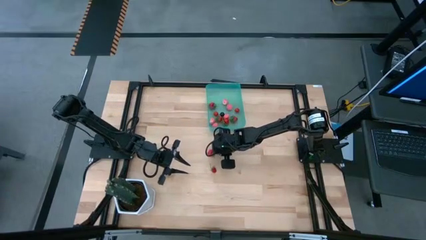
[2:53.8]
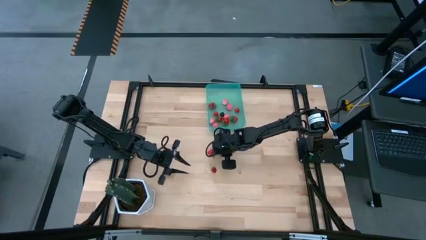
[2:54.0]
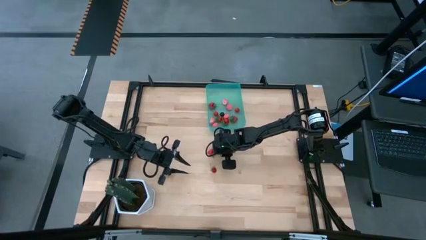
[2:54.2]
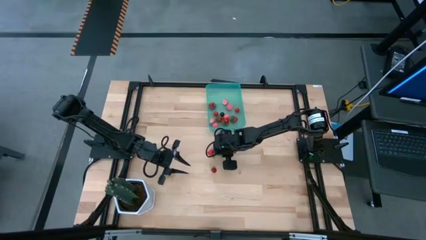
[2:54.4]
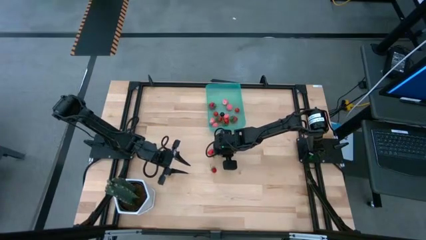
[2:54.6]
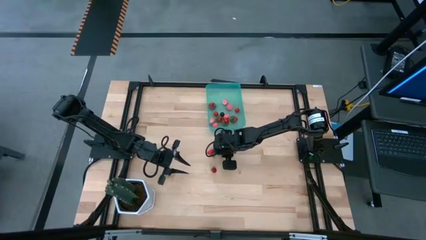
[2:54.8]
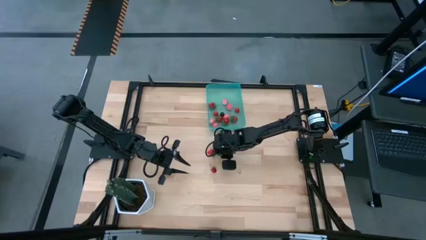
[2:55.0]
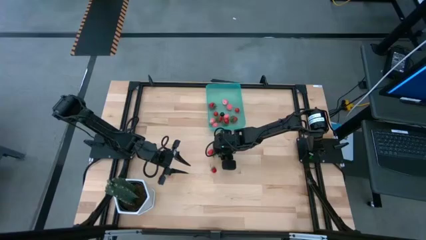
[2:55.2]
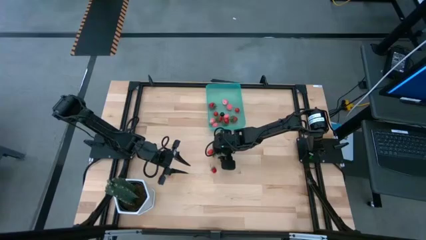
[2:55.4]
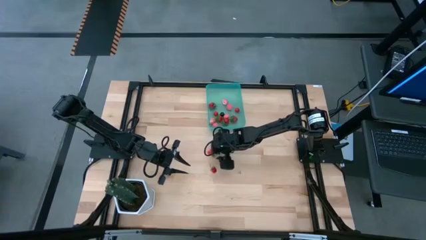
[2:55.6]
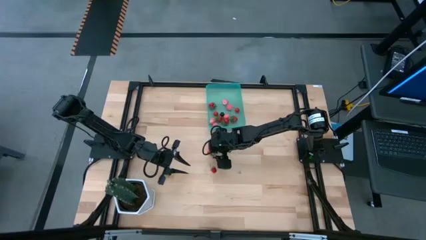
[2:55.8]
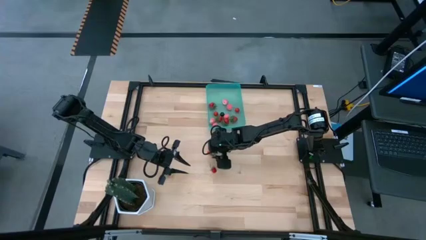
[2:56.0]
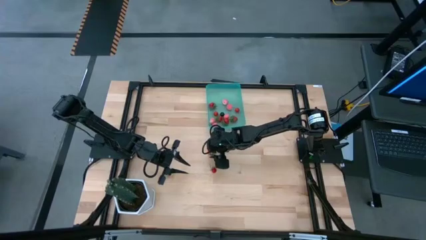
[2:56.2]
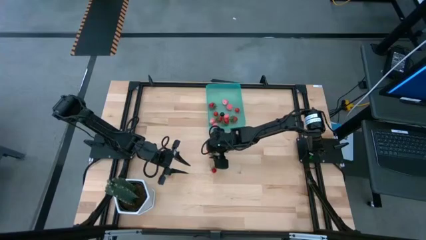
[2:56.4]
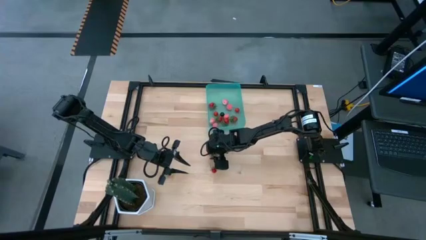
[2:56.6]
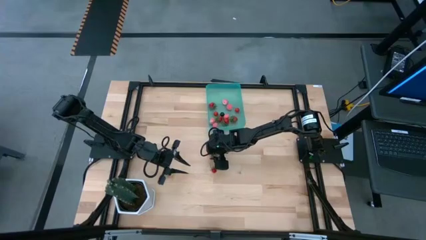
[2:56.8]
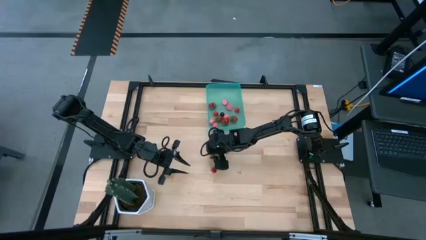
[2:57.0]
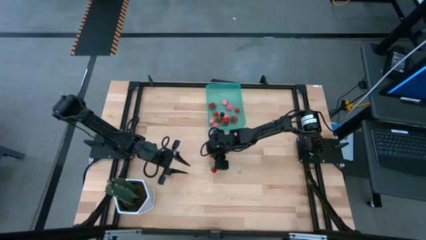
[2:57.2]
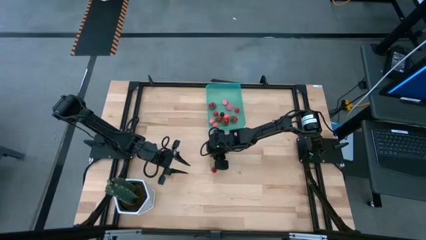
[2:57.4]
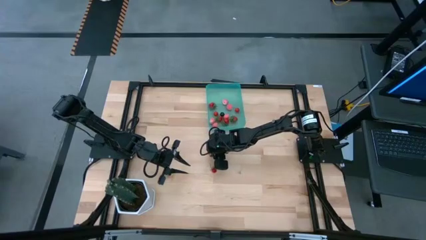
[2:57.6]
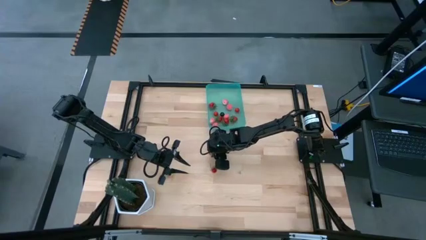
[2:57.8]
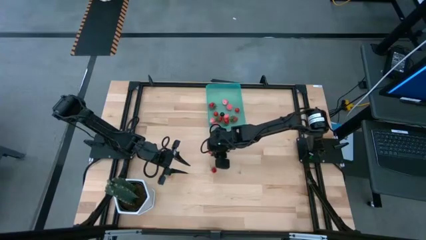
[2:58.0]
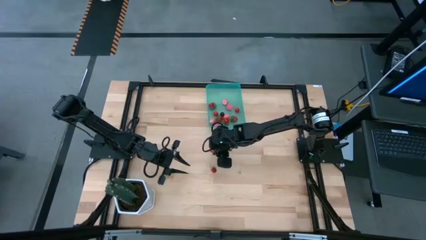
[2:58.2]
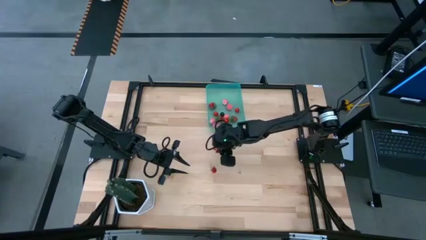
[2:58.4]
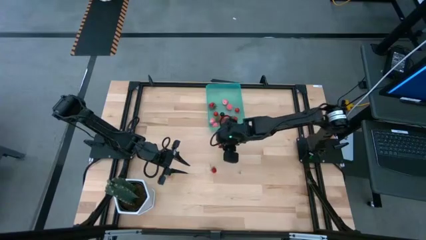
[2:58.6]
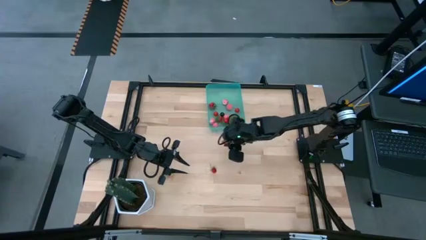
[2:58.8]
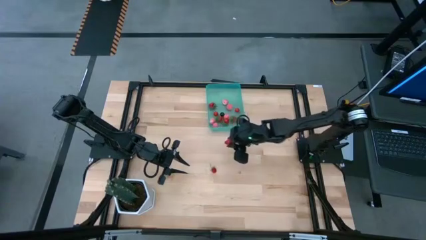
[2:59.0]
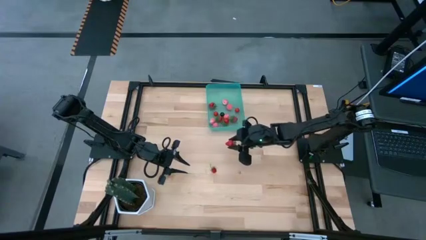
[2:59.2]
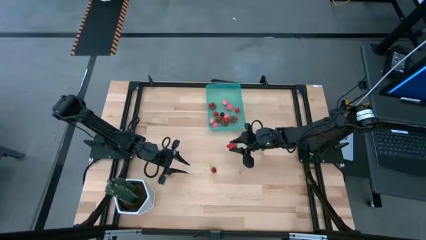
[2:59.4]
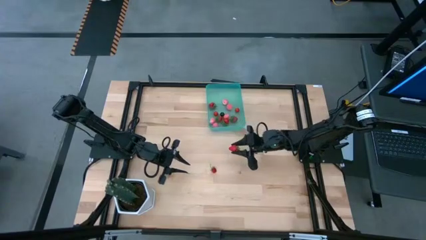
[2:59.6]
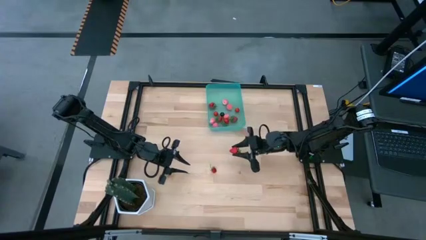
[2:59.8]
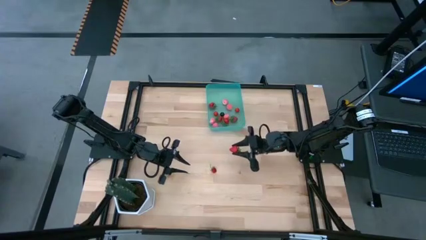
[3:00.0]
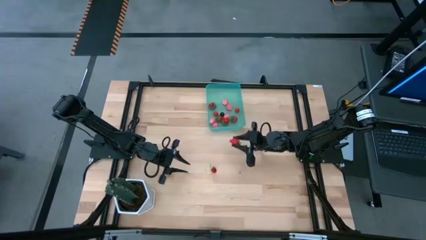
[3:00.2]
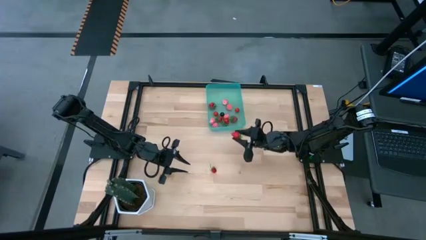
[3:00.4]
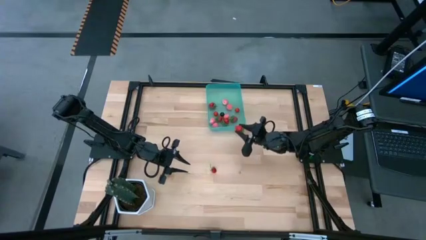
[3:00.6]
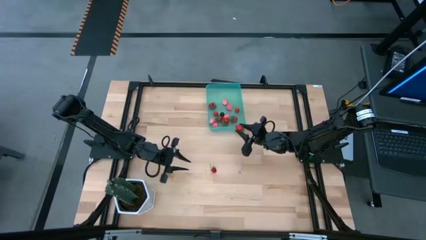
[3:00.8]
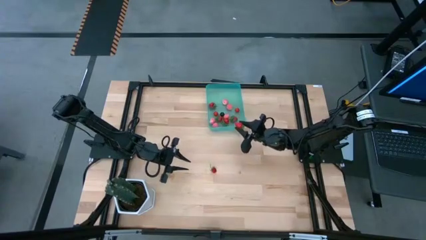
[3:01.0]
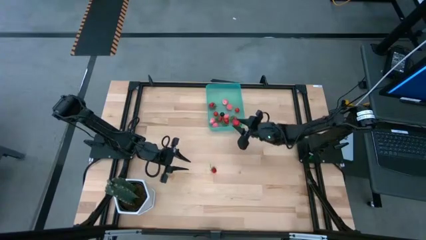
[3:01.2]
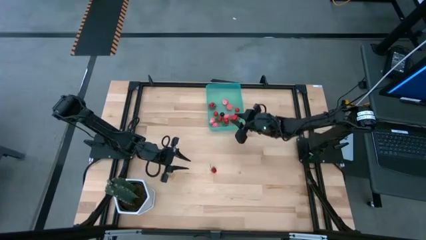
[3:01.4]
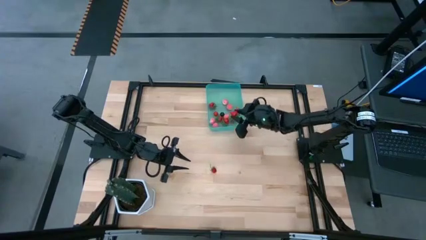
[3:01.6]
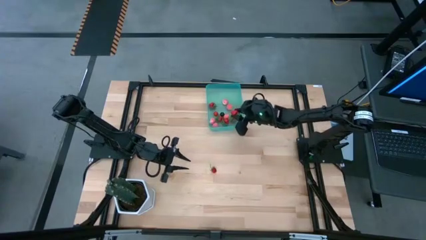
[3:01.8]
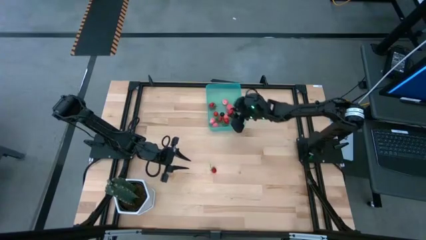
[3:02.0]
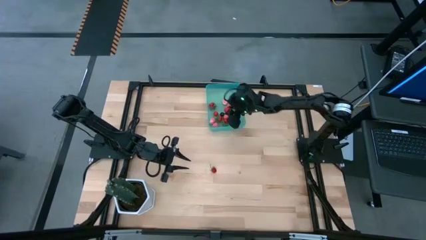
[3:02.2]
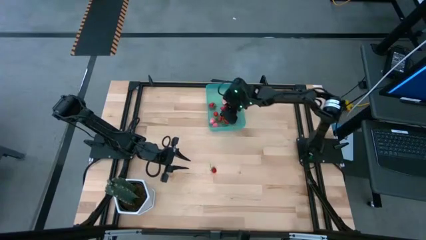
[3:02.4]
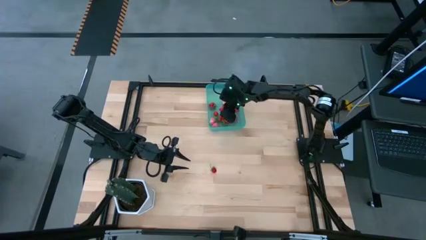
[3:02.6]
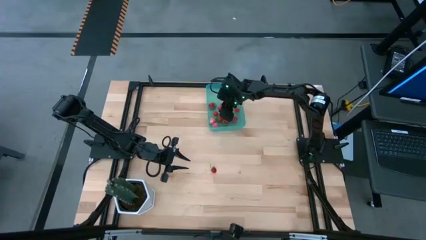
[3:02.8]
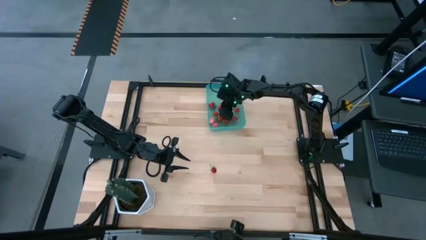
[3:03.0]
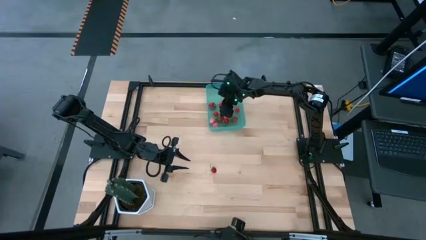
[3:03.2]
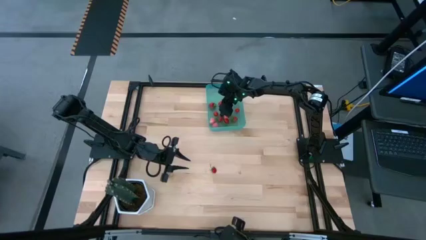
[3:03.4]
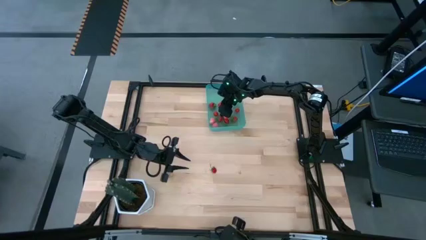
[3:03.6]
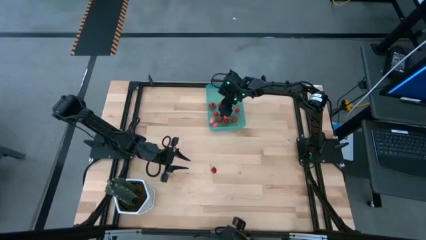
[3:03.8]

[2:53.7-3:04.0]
Task: Pick and placing Produce into tupperware
Put the red strawberry into the blue bin

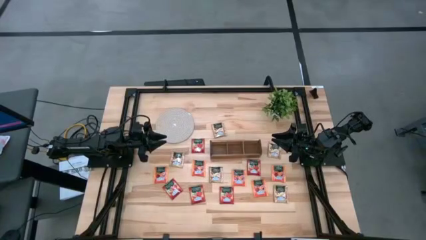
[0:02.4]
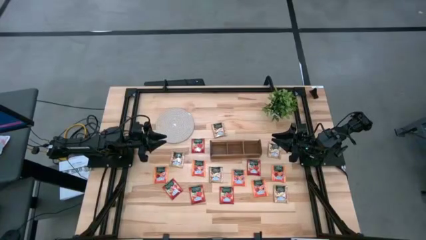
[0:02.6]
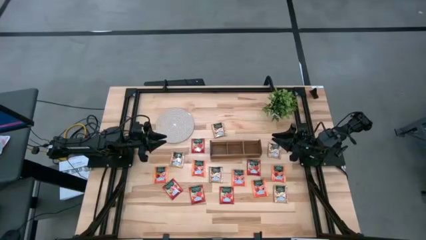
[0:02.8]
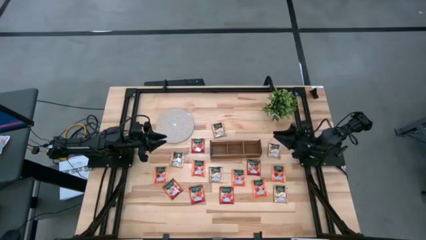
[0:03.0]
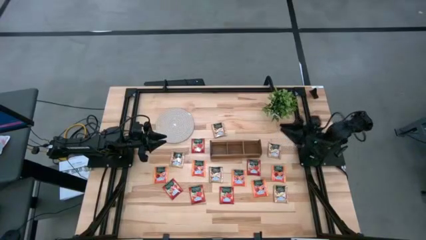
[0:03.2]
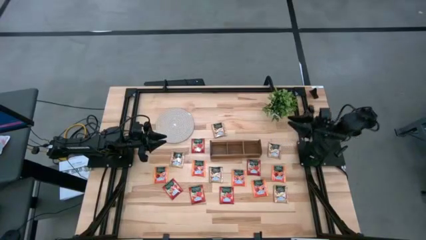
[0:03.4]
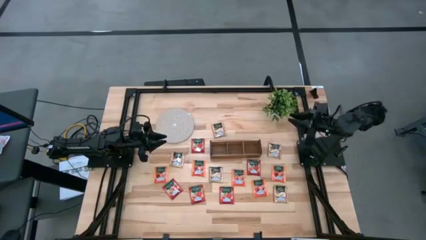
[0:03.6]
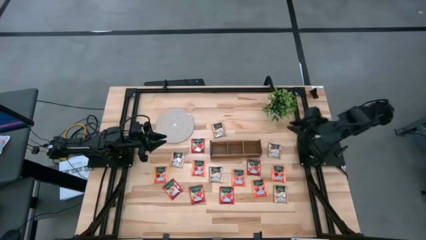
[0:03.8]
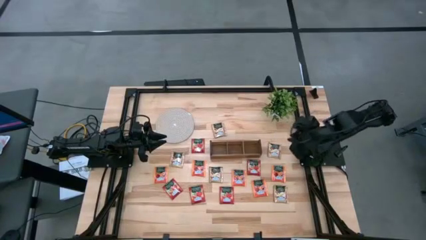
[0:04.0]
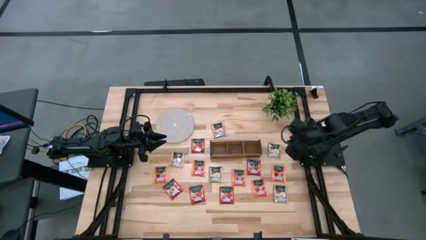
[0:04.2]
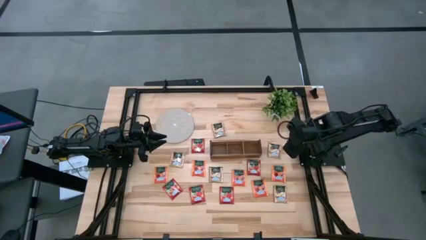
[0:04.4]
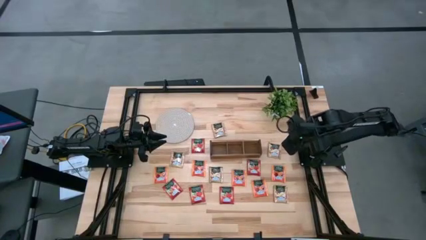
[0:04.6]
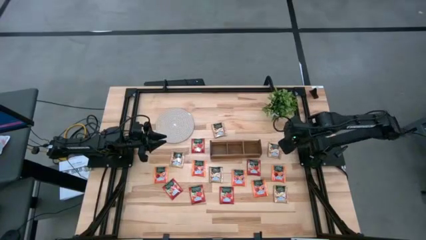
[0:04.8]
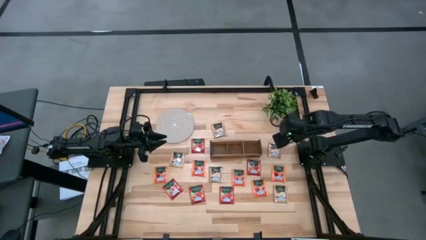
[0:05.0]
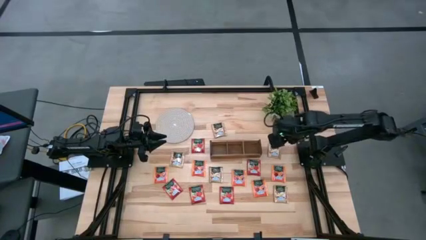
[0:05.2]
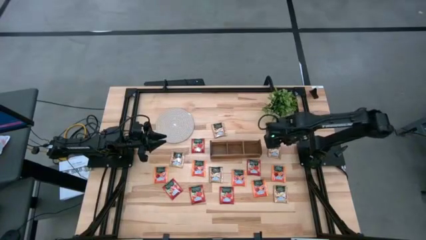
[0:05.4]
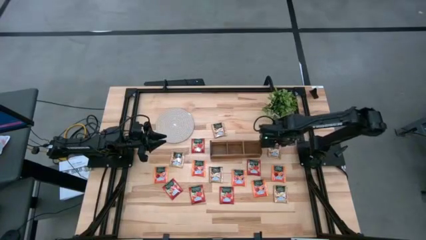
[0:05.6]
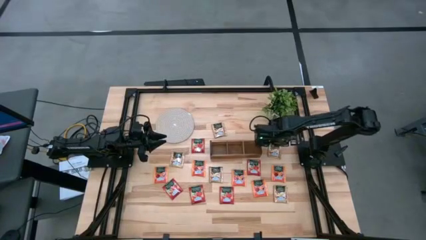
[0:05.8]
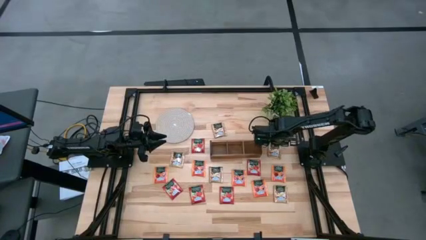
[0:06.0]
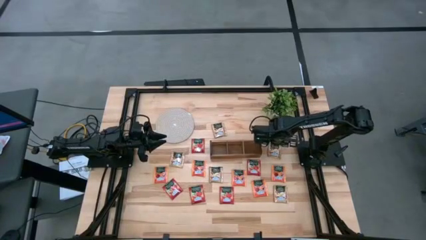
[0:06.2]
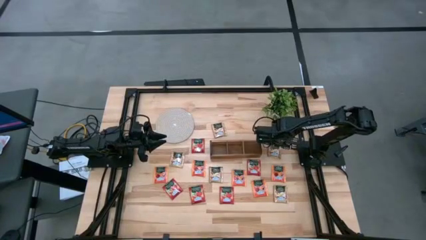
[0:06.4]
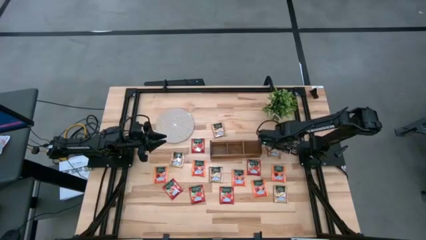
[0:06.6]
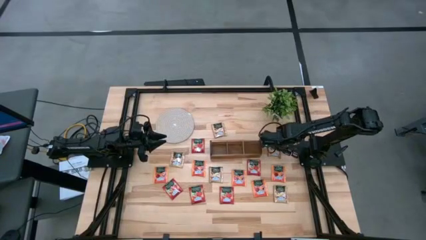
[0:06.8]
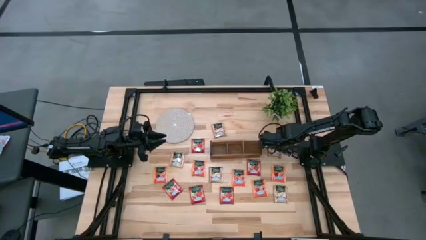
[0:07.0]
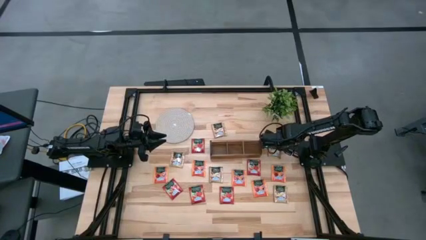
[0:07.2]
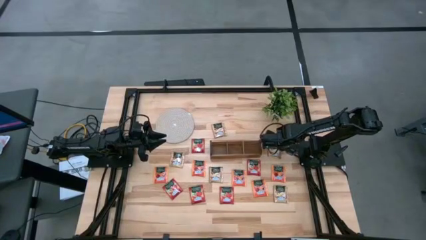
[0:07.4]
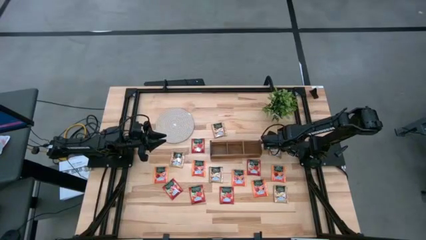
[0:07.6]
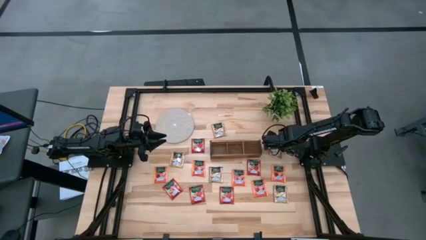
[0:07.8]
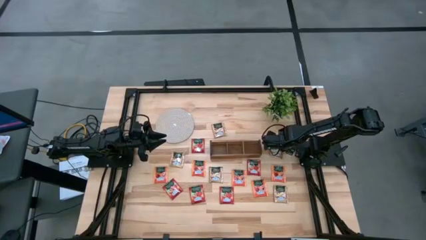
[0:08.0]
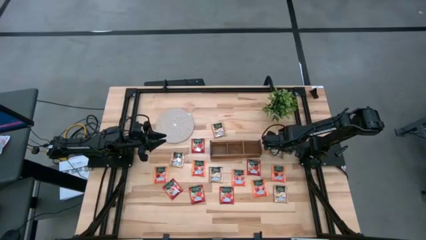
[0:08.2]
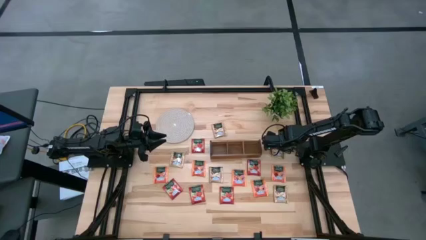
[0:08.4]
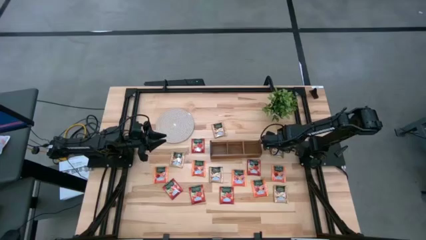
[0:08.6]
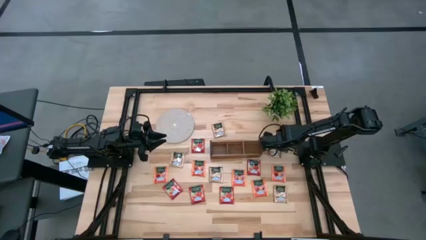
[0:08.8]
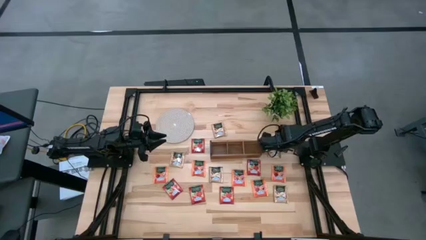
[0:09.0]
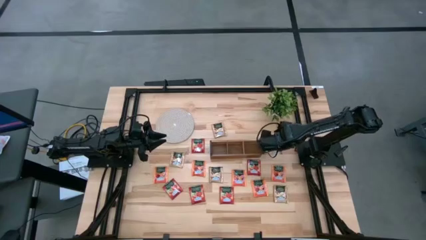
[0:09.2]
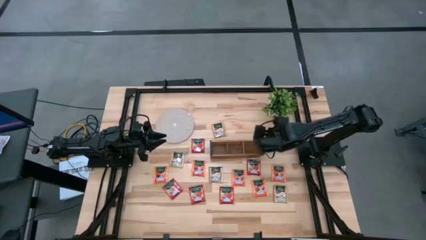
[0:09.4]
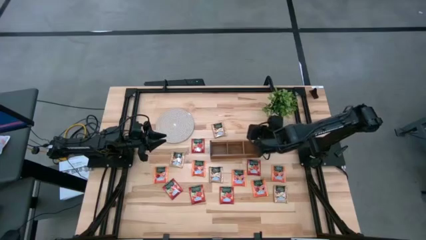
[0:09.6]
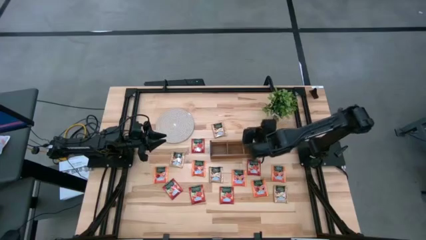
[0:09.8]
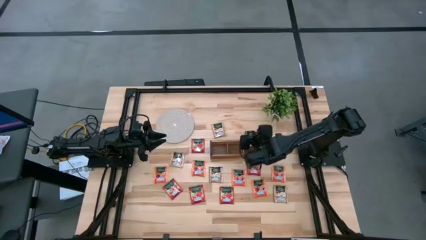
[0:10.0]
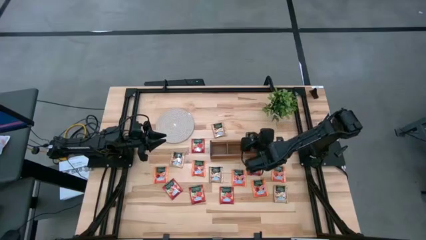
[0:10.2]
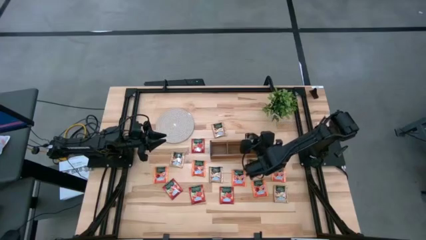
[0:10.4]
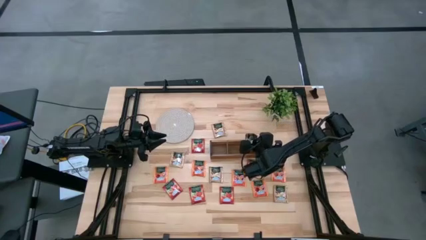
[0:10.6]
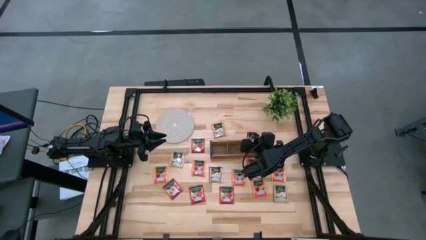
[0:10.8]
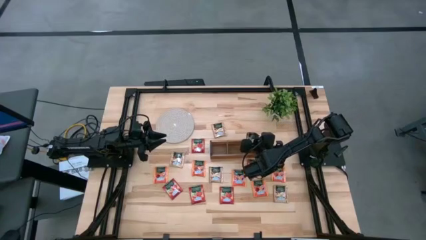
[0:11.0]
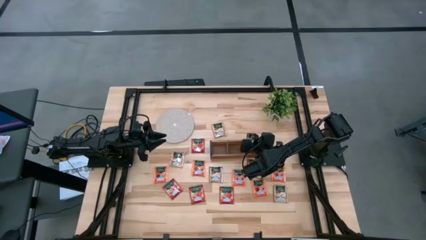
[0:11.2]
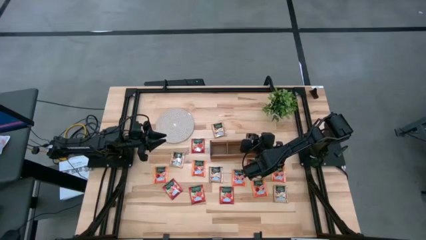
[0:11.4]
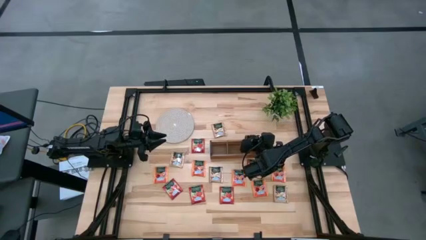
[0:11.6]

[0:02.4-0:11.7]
Task: Pick & Place Tea
Put the yellow tea bag into the right section of the wooden organizer
